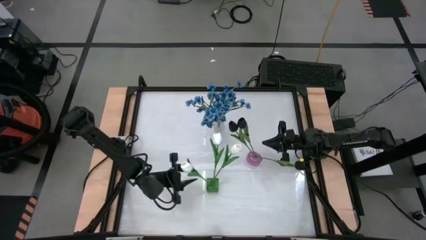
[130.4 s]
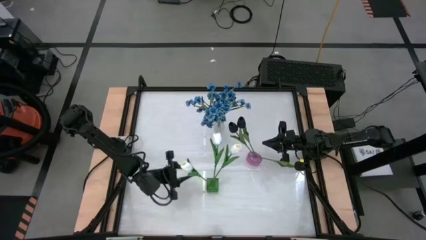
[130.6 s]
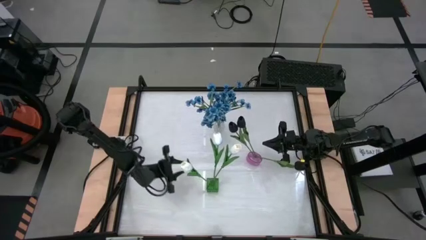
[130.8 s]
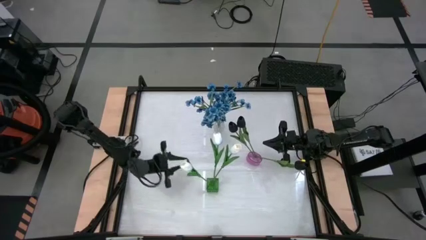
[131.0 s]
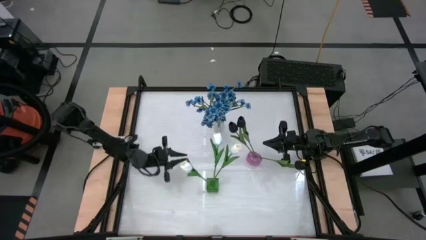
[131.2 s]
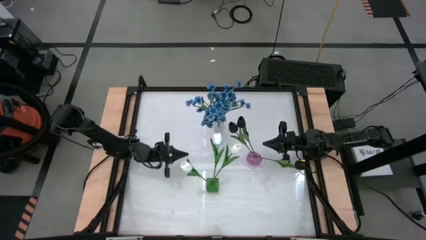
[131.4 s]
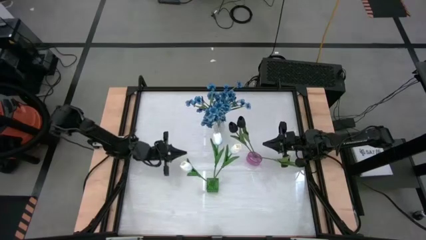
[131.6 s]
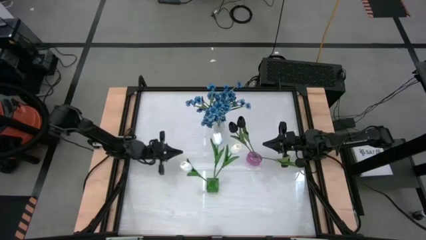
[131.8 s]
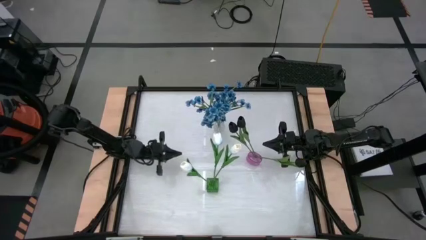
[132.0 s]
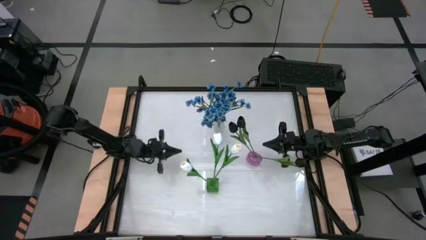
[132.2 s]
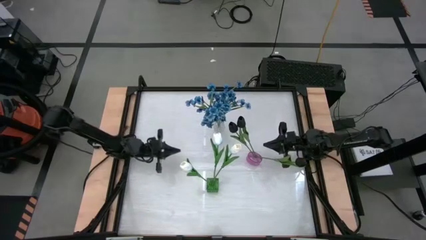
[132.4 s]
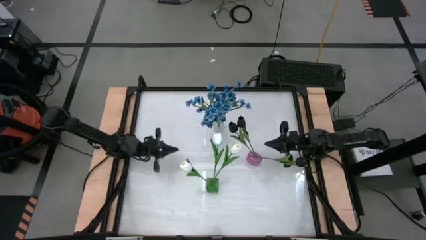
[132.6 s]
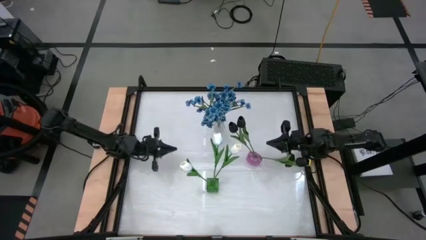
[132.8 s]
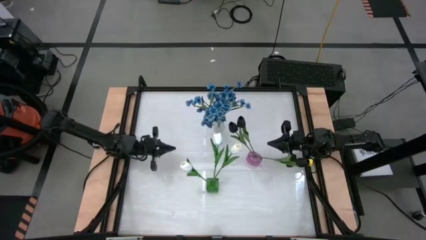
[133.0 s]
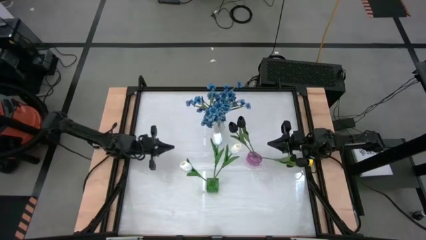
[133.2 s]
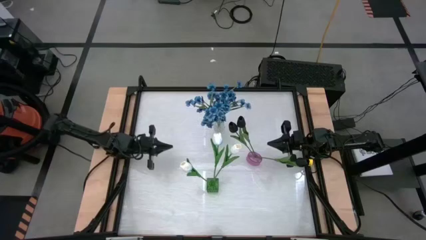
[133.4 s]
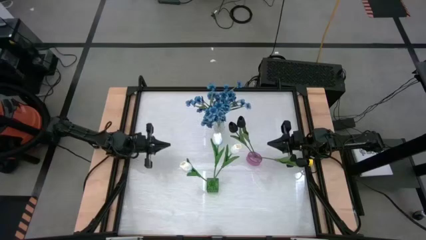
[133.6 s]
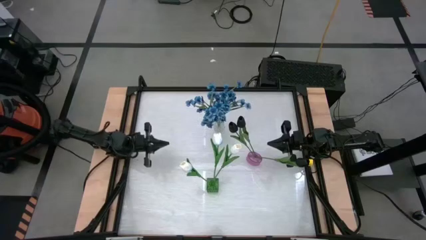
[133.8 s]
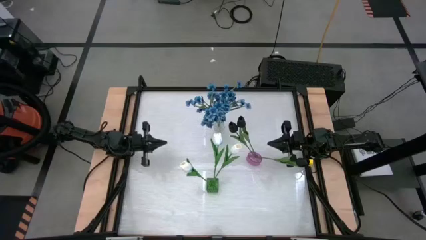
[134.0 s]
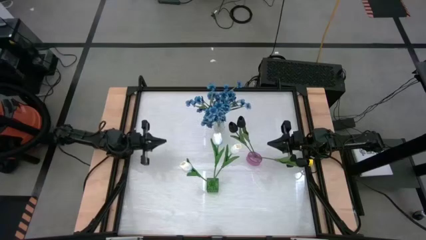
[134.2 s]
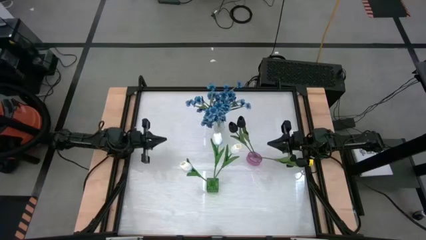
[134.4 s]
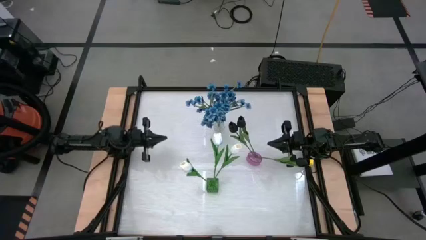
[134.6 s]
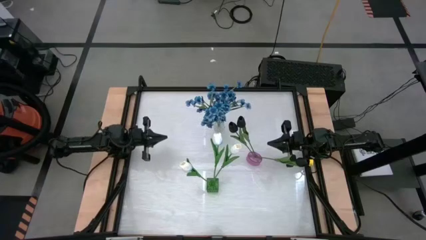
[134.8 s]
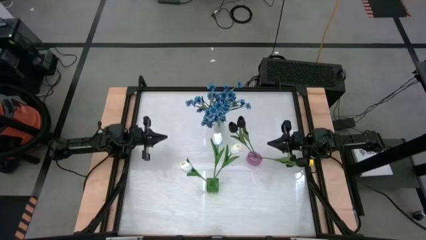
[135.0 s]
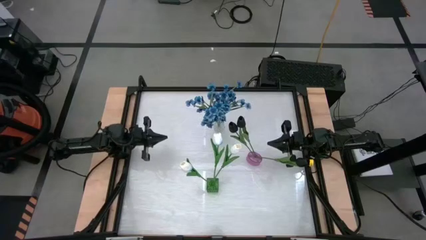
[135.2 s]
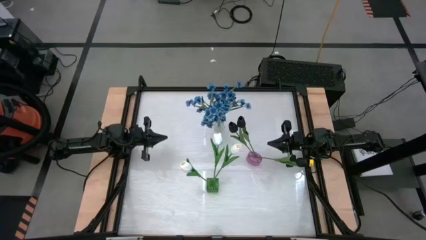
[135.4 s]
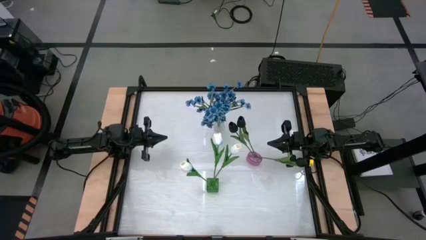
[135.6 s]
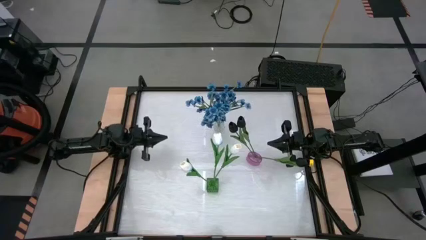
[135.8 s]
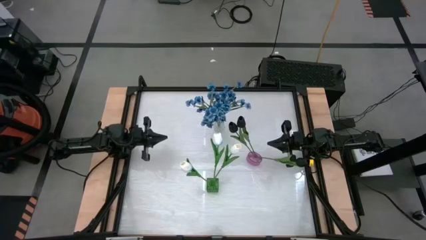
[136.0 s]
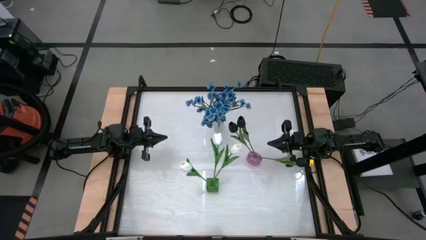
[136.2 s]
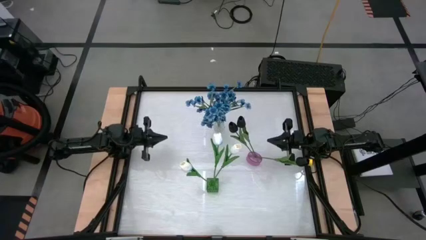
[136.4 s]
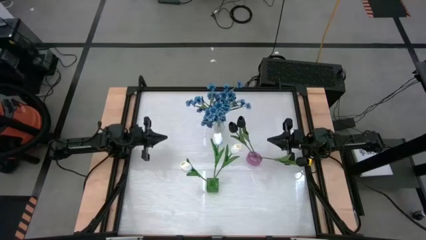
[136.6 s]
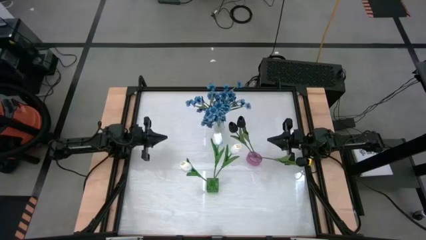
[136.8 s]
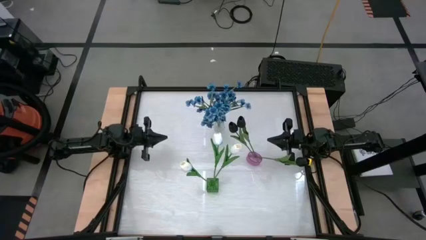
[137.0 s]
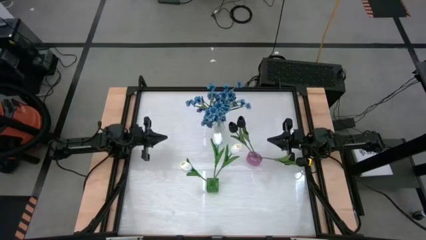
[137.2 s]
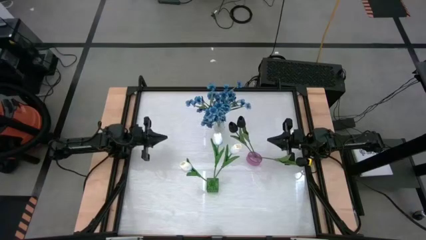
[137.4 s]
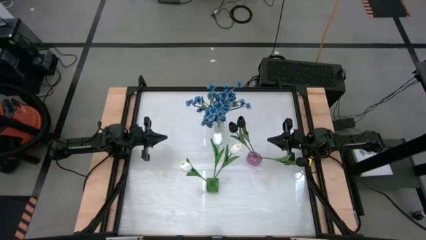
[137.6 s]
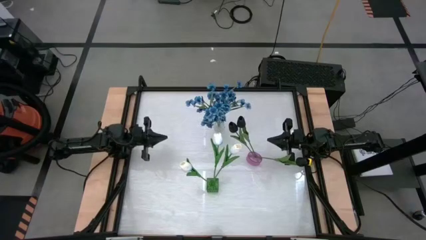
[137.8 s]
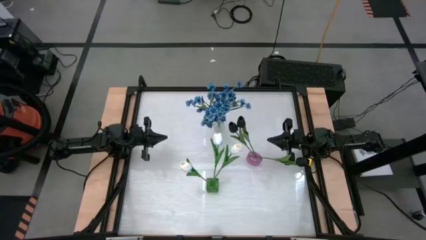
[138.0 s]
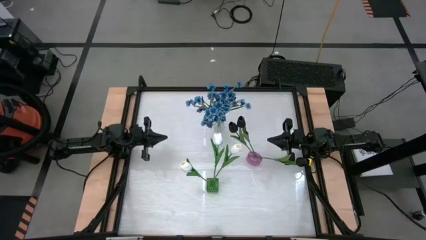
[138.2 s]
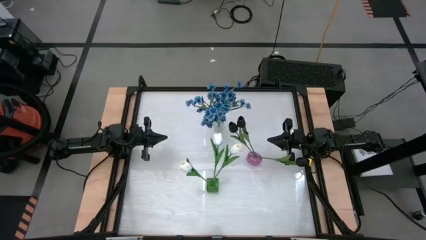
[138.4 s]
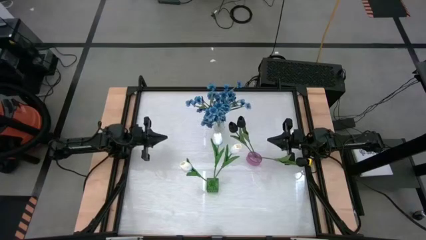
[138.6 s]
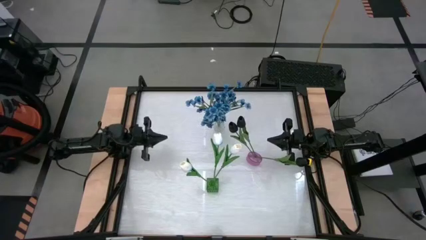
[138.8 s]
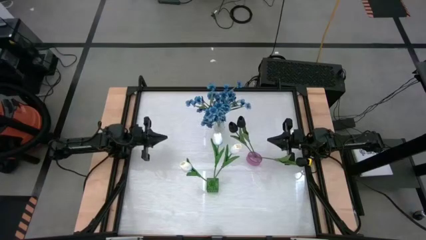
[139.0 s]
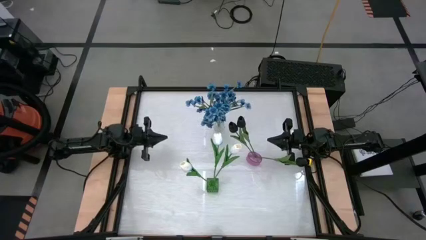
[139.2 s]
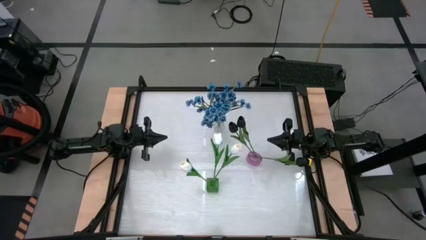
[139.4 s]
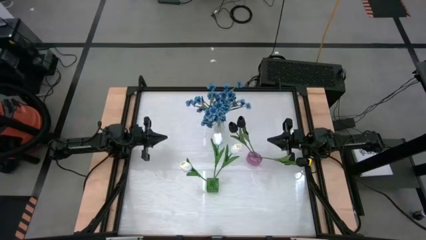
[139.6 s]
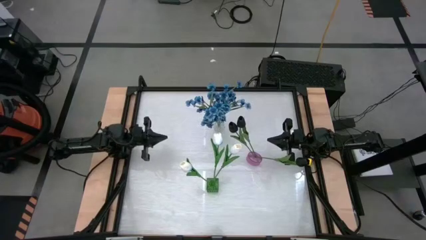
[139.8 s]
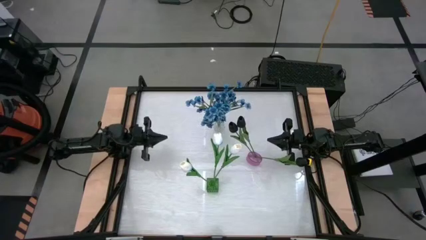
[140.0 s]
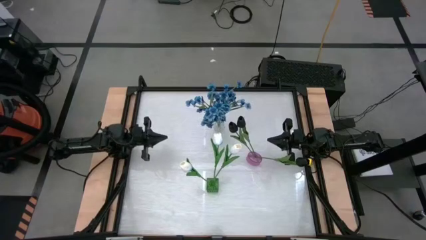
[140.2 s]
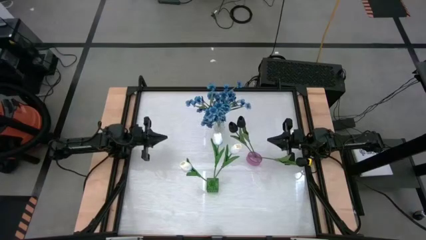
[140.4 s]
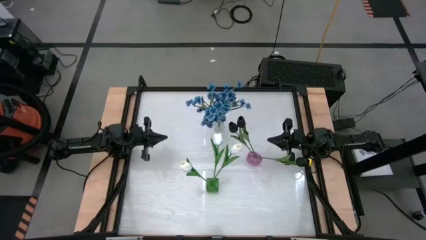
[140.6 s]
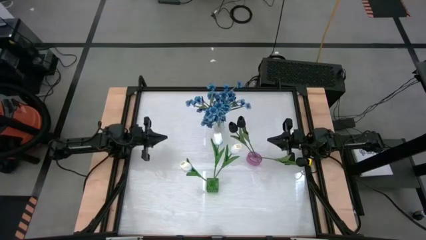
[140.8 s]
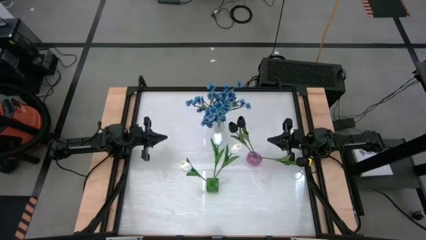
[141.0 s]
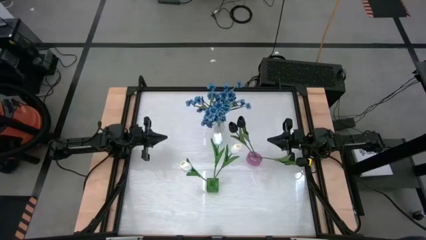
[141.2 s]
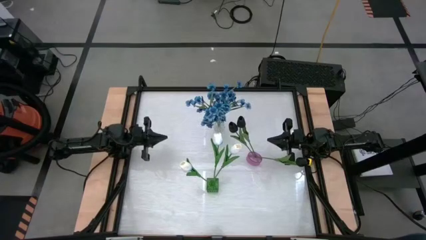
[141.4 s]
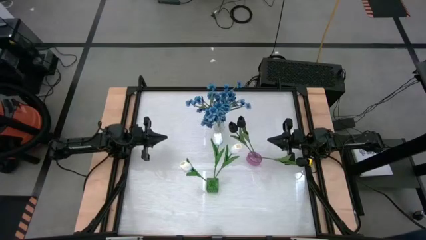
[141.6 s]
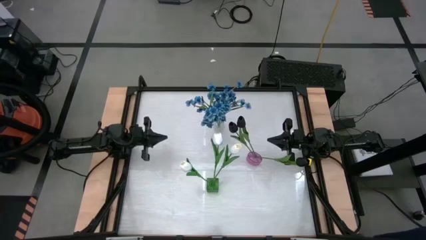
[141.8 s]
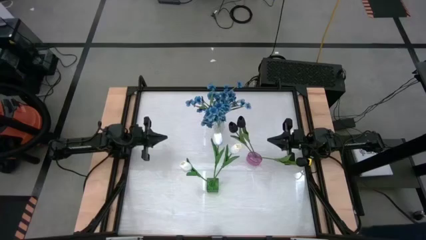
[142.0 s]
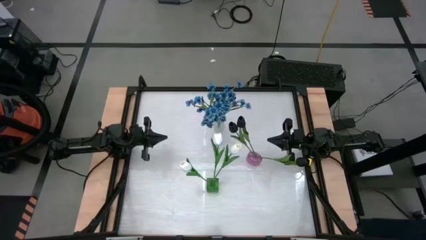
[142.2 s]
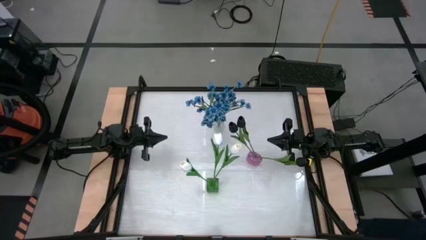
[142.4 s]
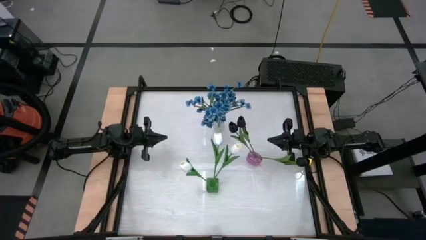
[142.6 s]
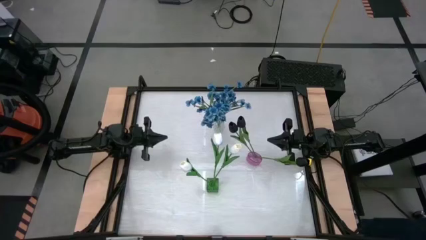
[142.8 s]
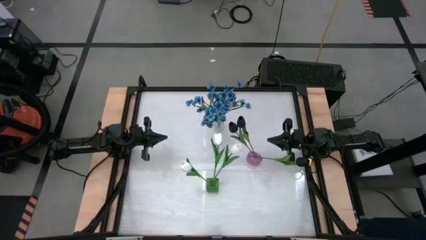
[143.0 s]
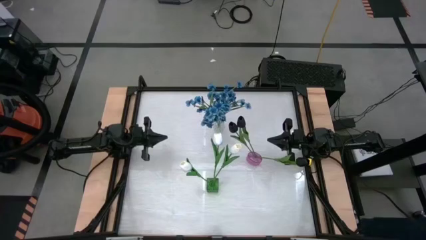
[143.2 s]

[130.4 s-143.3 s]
Task: Sort flowers into vase by color
Return to Home Position

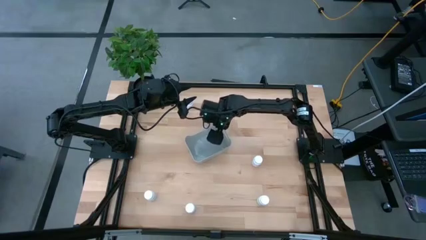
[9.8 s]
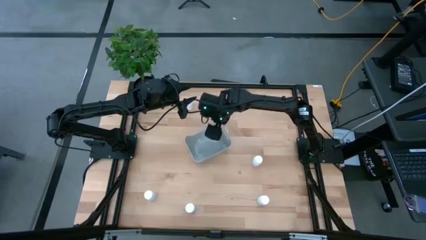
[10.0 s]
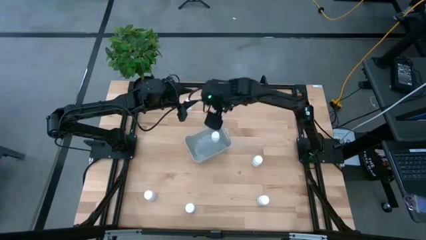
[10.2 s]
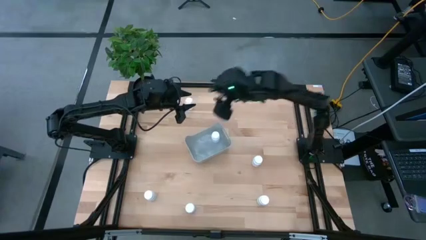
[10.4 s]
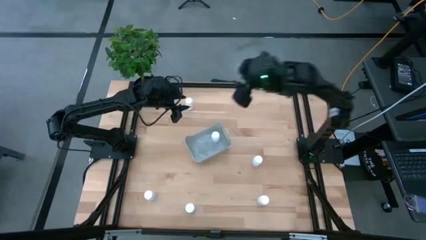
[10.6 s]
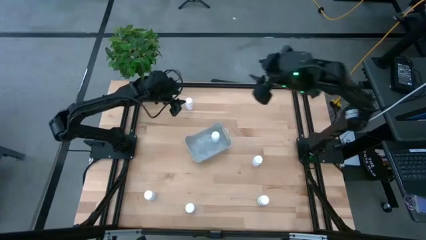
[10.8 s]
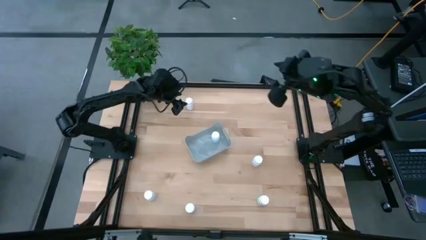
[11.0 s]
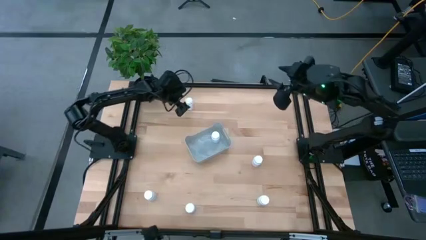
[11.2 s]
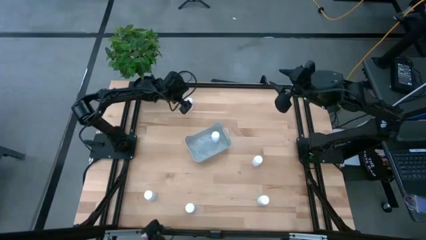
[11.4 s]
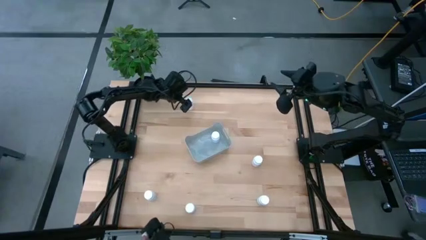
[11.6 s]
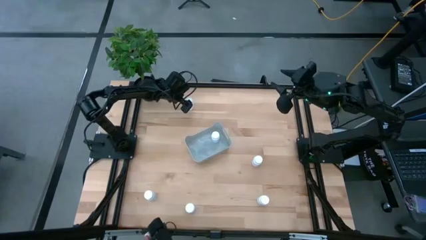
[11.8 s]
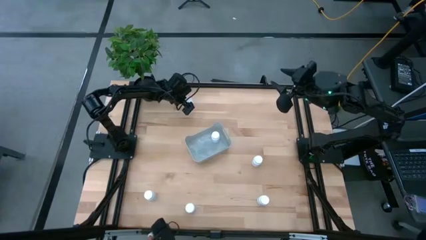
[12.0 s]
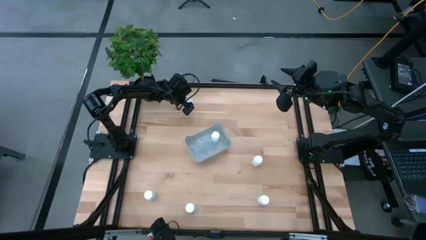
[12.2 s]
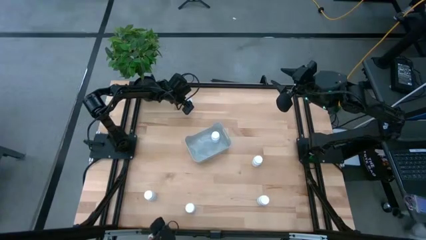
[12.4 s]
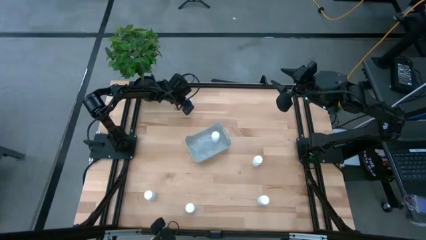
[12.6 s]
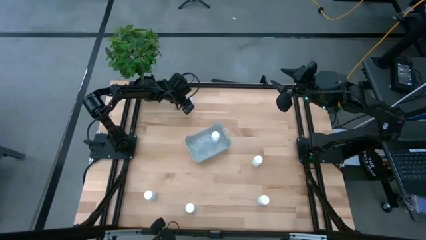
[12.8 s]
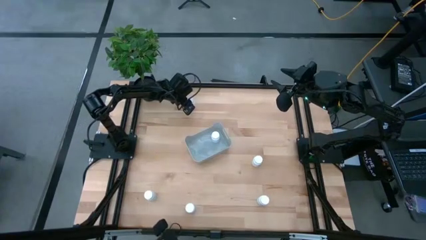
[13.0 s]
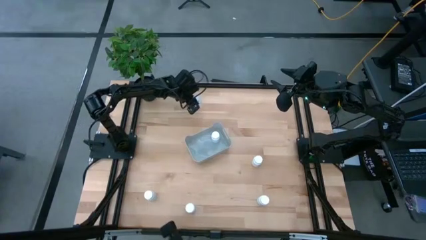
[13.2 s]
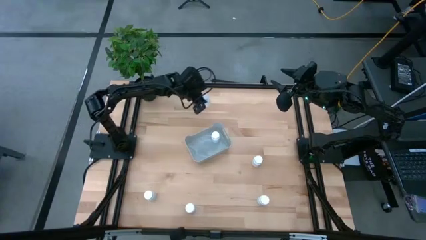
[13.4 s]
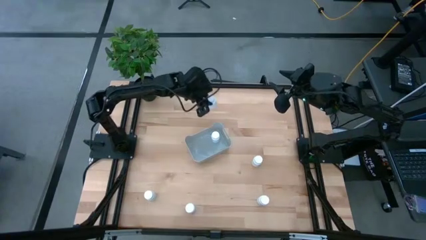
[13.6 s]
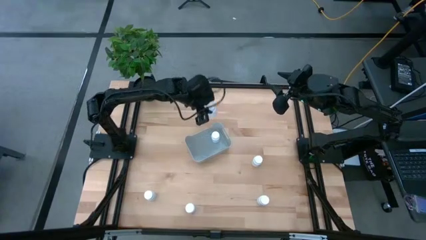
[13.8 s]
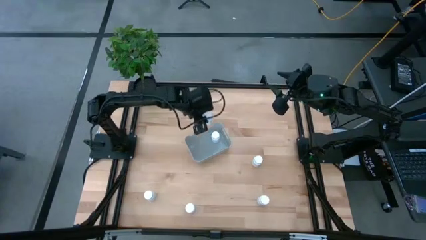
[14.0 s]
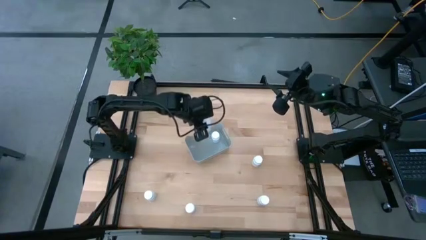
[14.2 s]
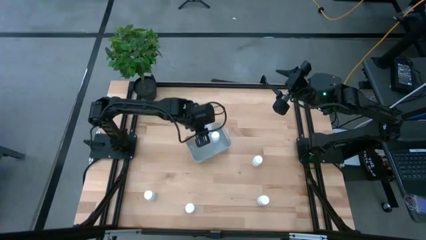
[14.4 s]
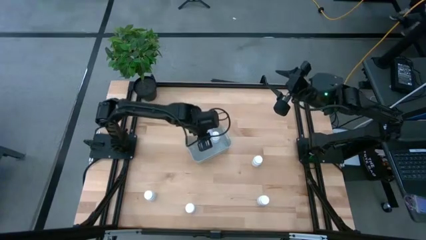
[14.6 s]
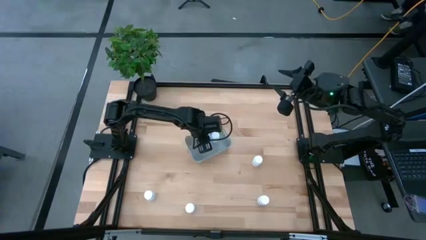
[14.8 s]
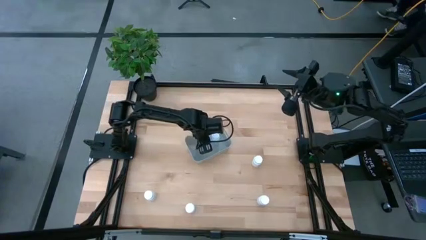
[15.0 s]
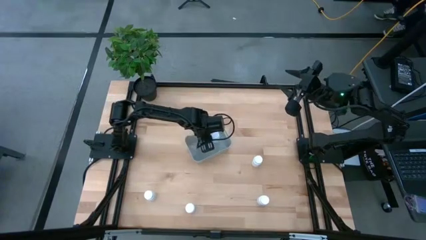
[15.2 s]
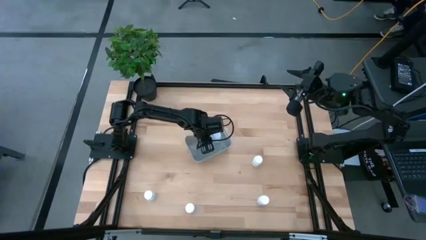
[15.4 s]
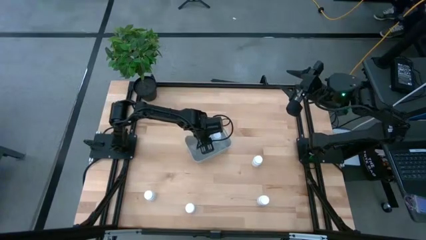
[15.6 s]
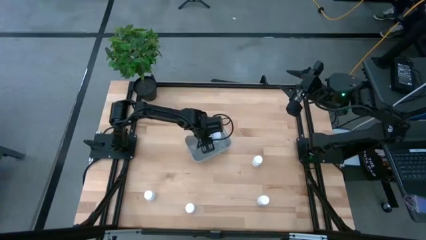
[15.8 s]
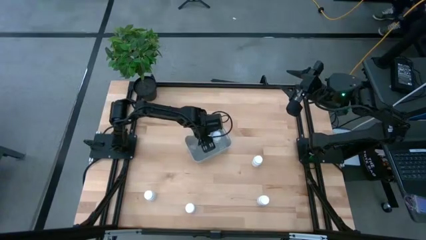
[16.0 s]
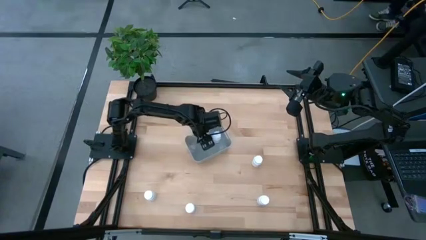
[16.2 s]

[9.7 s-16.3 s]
Task: Pick and place pill bottles into a basket
Put the white pill bottle into the white bin
